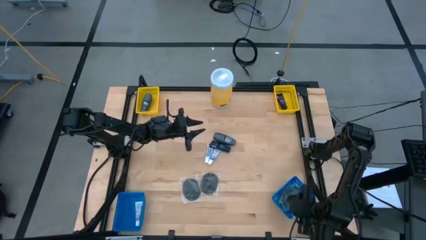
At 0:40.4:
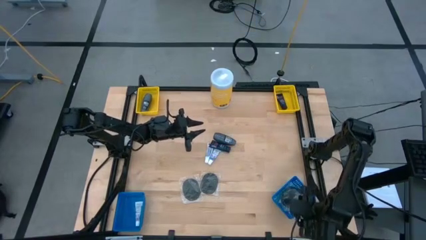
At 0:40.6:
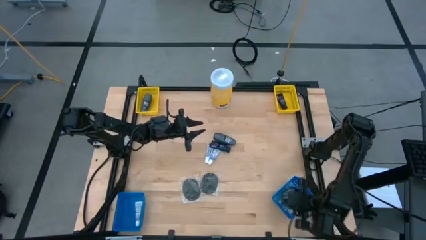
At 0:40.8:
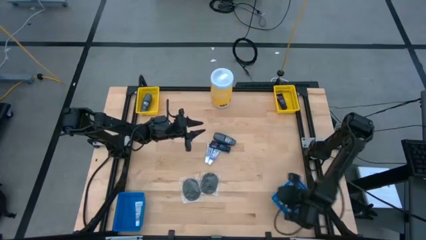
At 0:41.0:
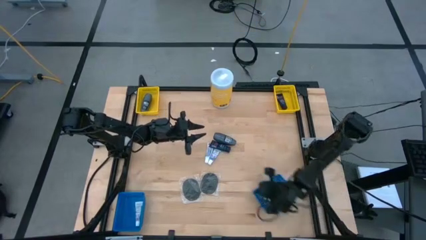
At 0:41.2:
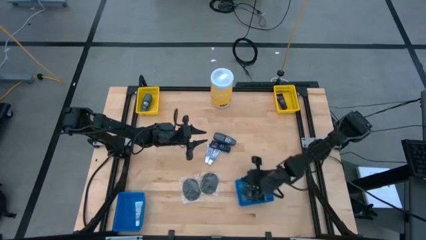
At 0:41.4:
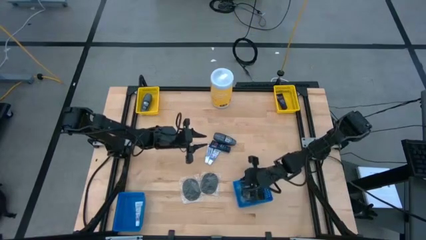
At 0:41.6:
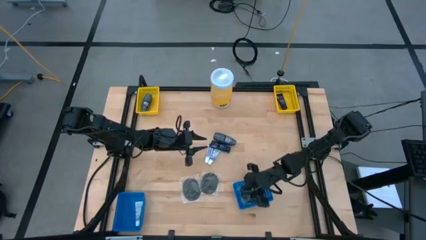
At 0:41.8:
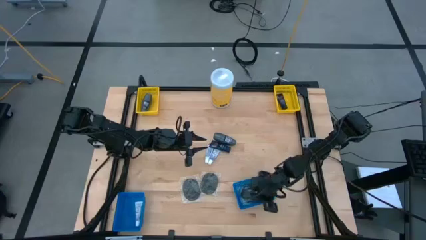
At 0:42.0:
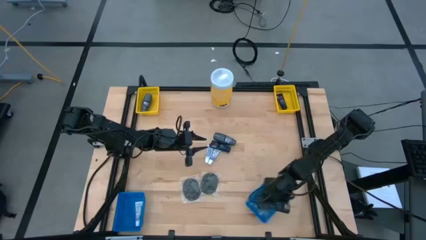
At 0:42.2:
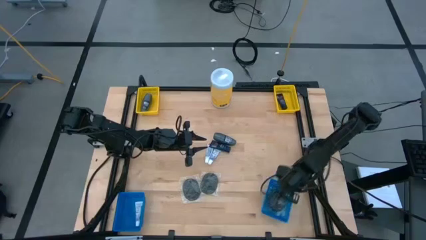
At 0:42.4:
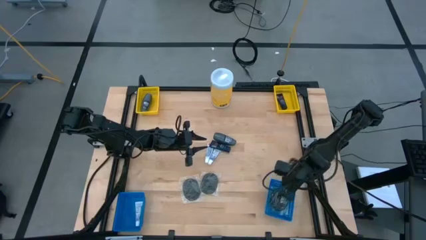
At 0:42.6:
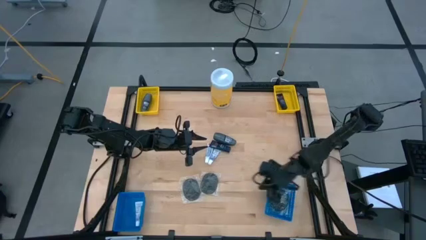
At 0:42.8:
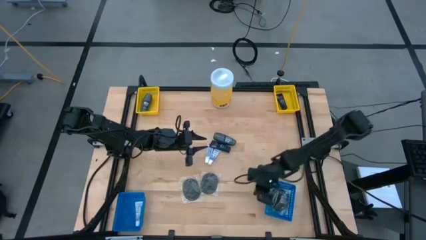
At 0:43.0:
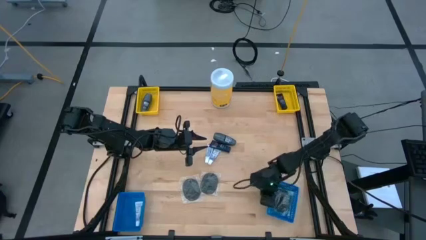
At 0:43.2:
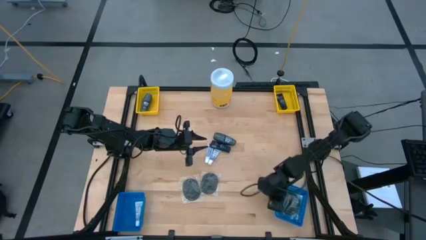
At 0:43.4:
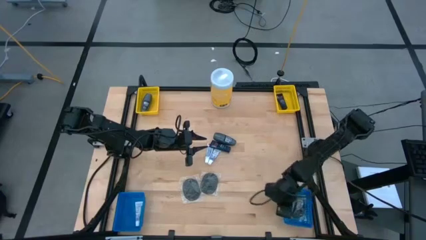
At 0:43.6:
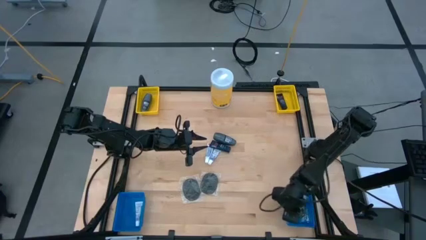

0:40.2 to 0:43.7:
Task: Pick & Place Travel size toiletries
Adjust the right blue bin

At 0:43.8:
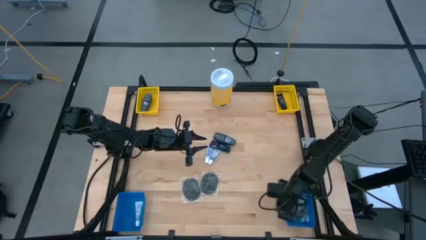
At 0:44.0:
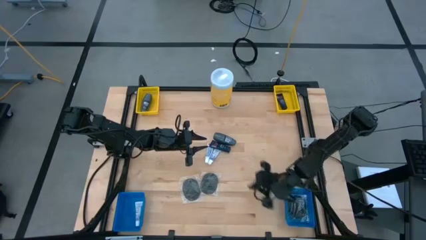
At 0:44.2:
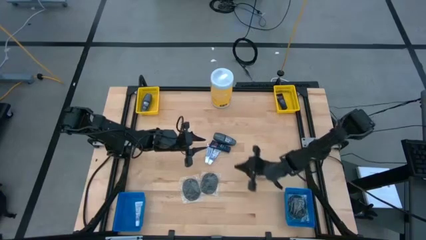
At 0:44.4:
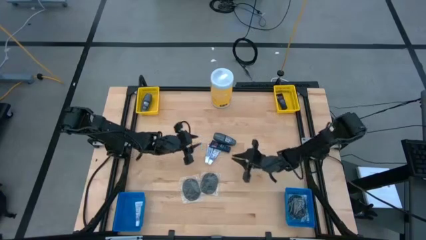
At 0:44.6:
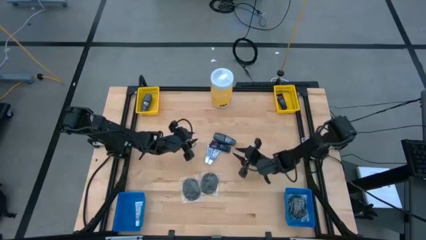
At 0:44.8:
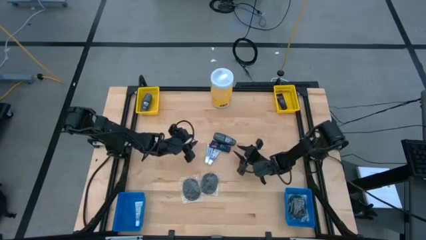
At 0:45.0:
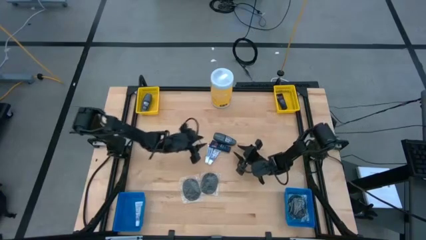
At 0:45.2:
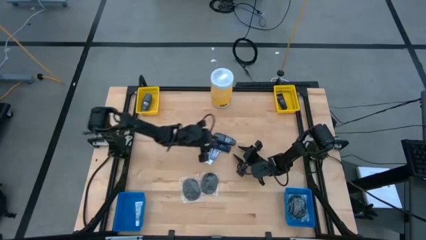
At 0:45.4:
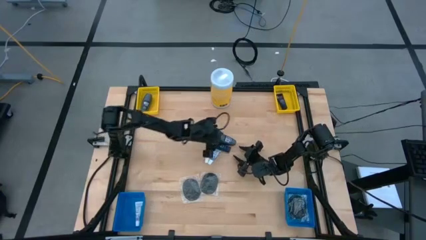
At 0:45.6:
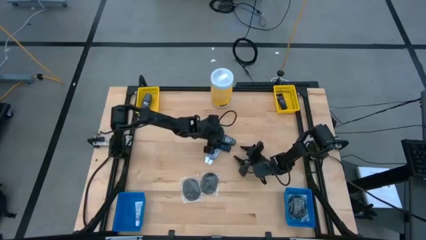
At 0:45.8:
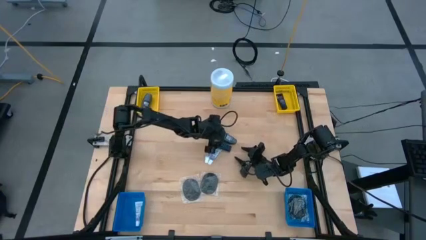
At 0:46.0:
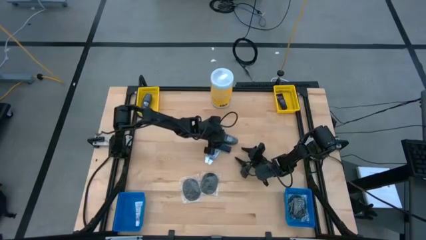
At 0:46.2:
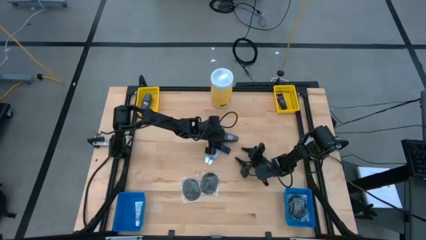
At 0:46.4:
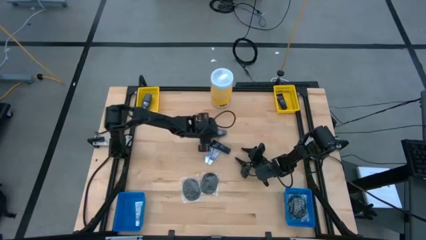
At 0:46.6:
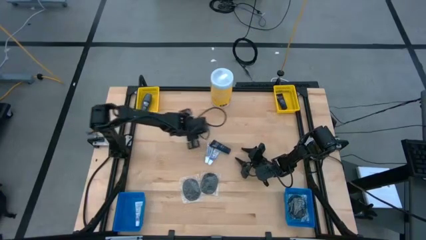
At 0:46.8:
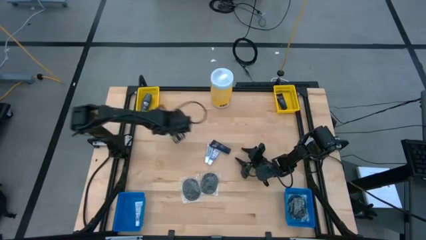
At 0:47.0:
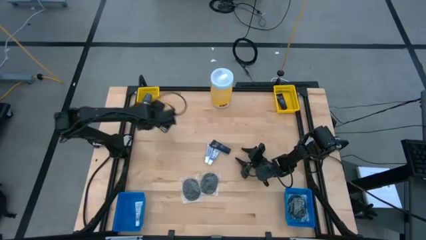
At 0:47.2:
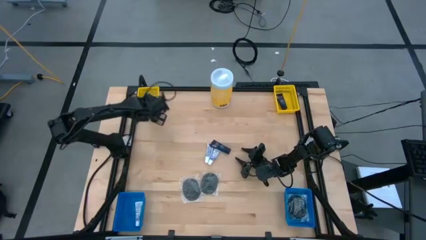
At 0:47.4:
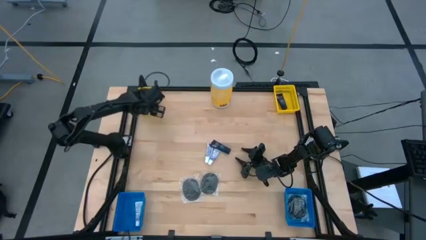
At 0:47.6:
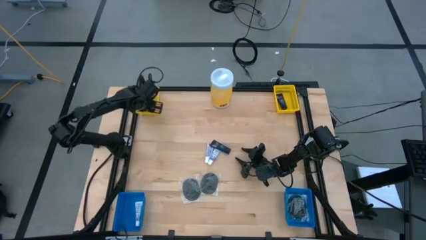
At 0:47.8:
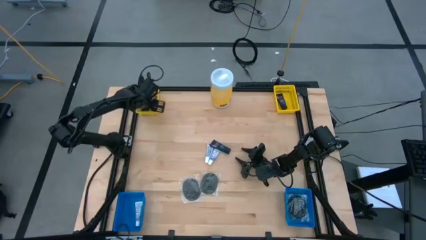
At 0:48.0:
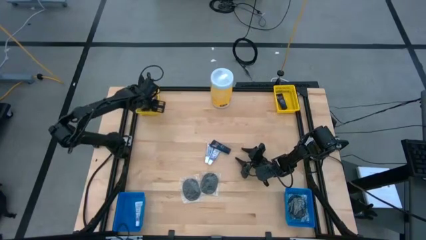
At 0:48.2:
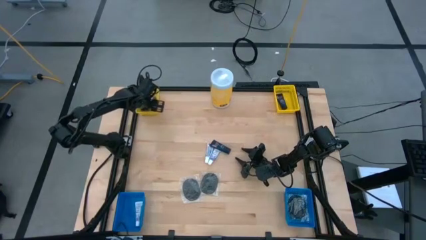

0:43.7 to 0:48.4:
Put the gray deodorant into the left yellow bin

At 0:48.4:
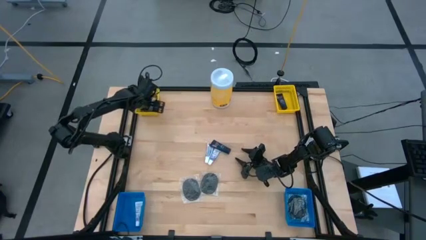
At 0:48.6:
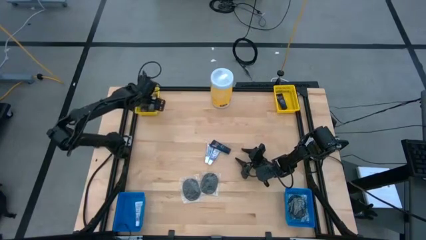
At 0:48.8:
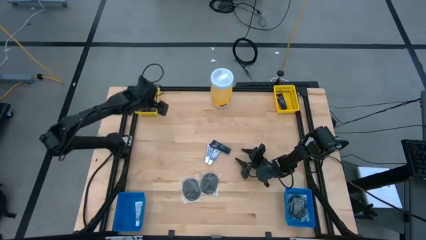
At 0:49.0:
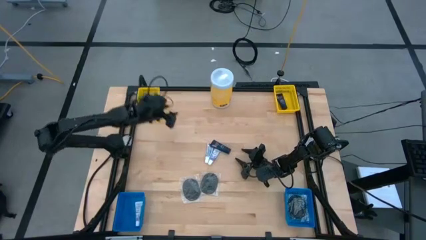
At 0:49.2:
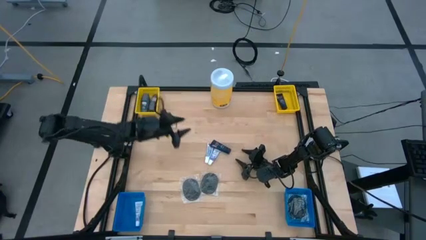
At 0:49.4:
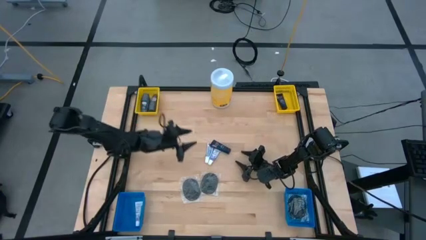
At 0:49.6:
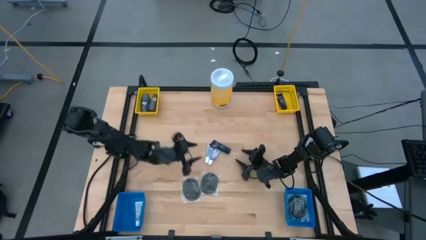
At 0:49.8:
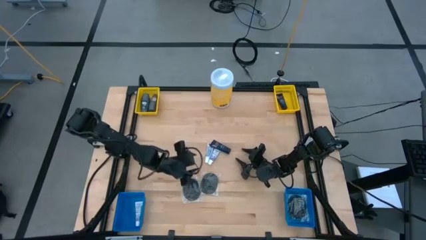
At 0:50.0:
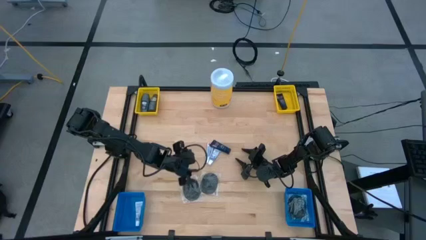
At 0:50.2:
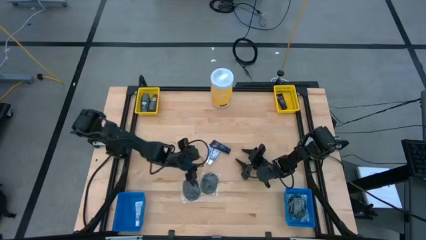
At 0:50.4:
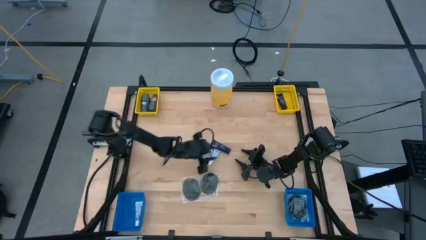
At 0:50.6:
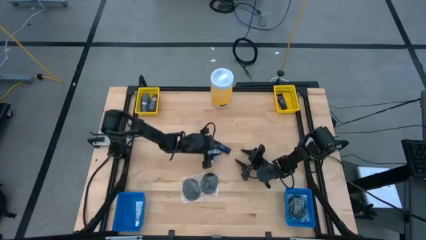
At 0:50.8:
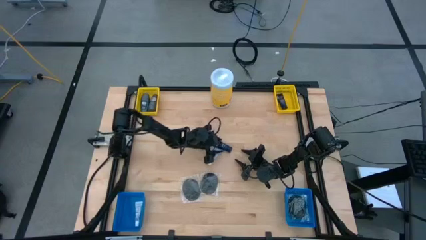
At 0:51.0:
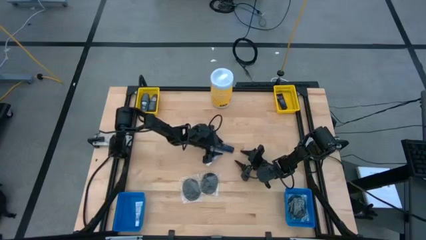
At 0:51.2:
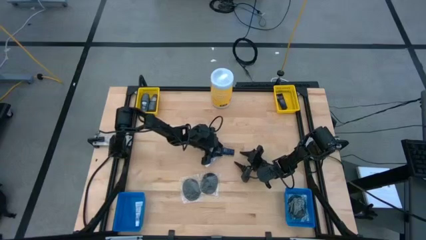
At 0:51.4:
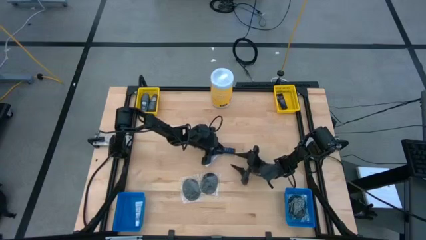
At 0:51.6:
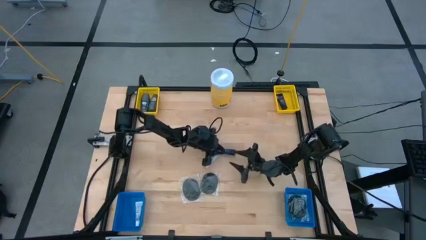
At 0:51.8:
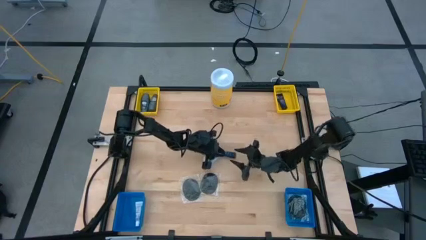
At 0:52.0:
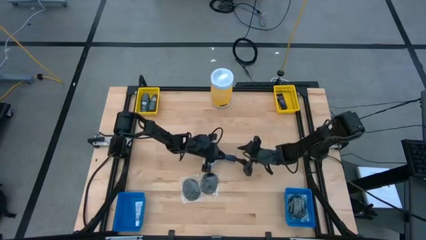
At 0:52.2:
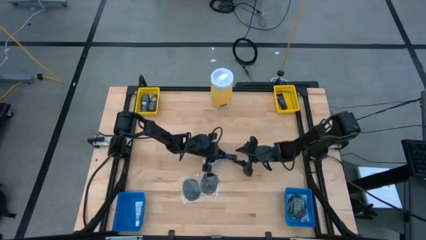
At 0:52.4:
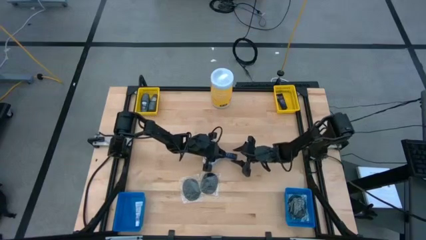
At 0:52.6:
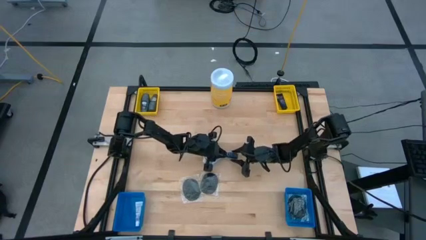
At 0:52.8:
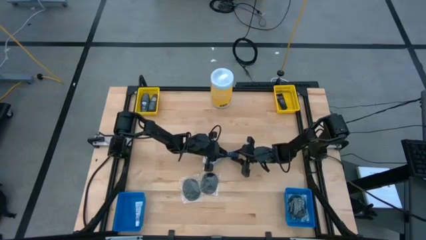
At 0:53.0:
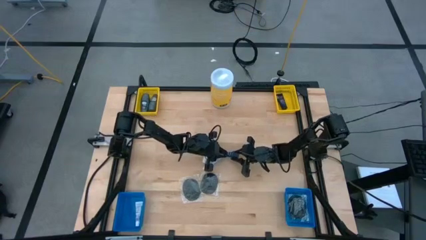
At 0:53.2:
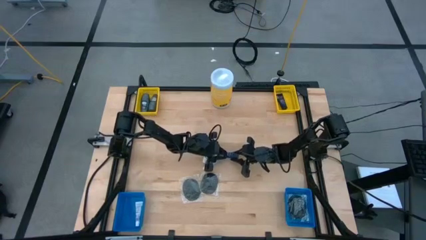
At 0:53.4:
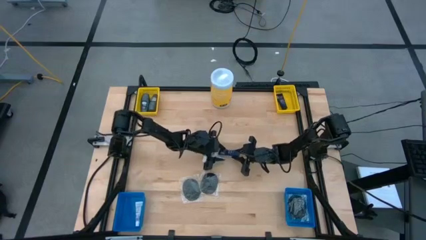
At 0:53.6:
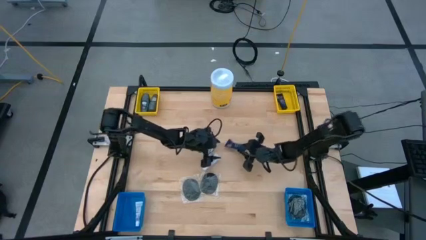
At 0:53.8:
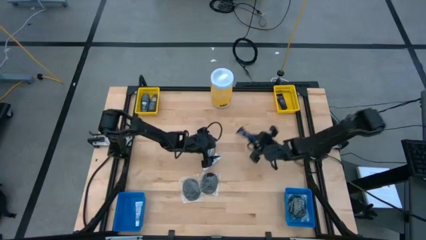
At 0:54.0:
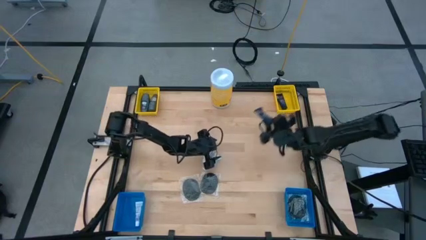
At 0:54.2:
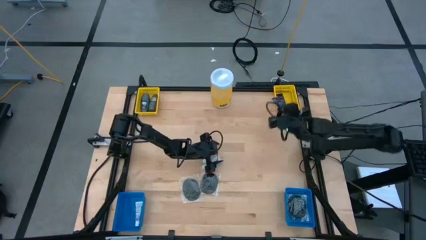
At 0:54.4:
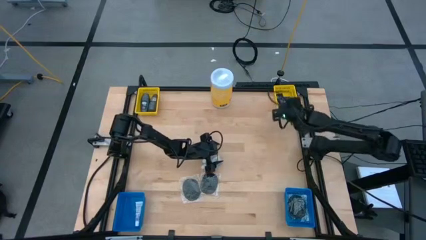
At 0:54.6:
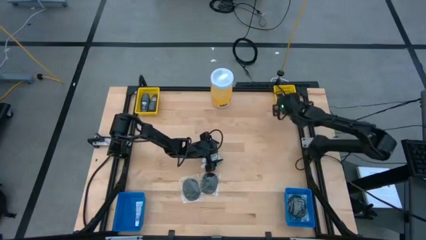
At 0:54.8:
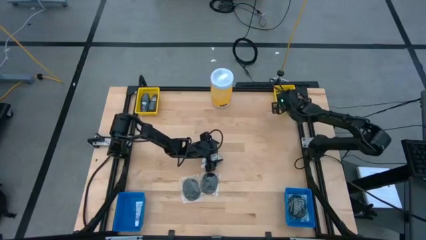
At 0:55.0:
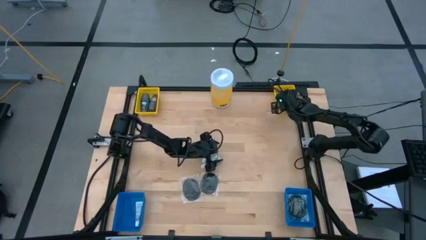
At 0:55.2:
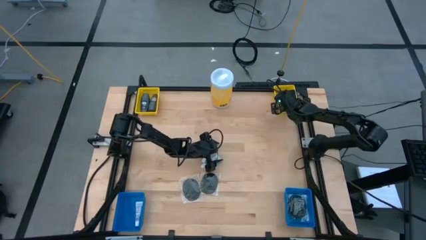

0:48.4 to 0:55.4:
Put the blue shaving cream into the right yellow bin
